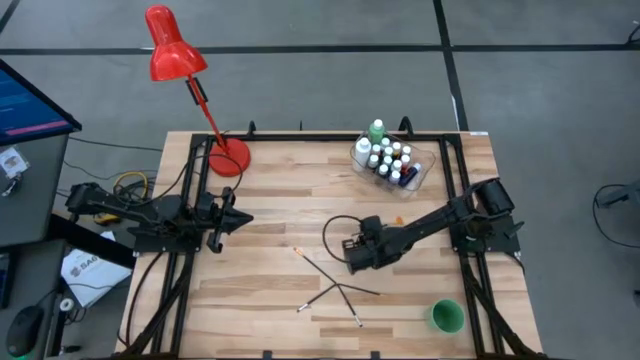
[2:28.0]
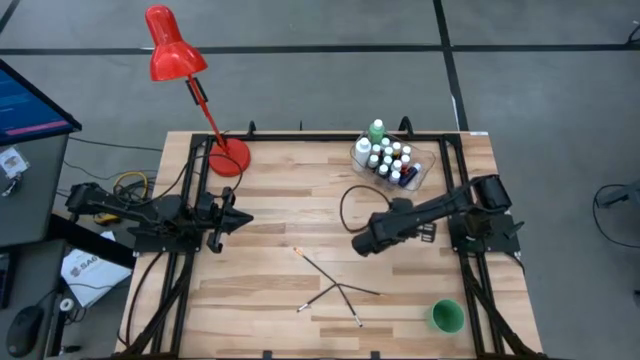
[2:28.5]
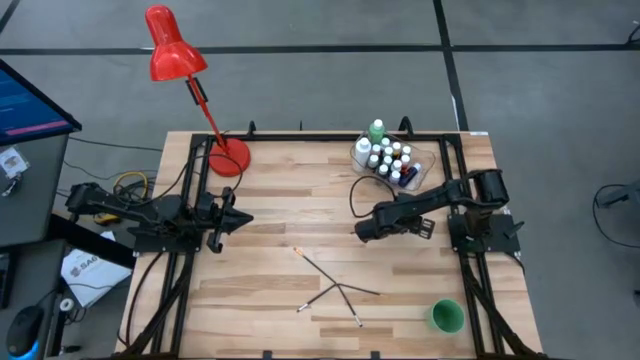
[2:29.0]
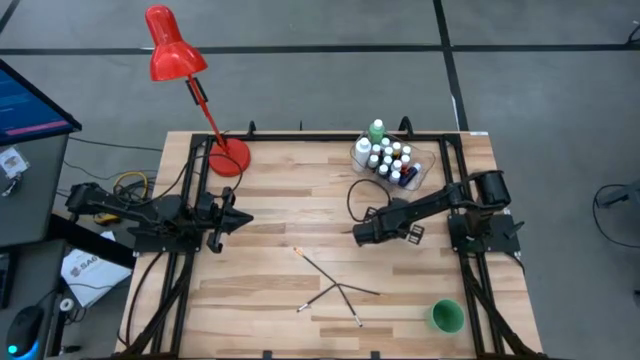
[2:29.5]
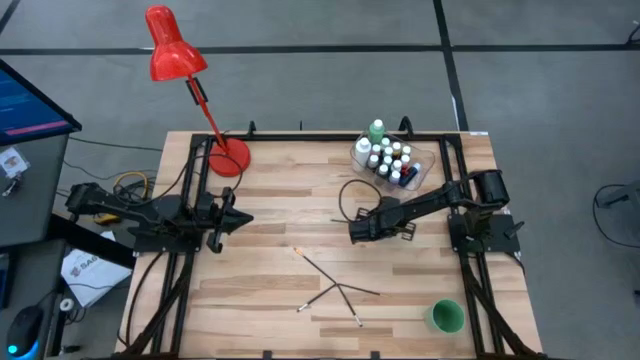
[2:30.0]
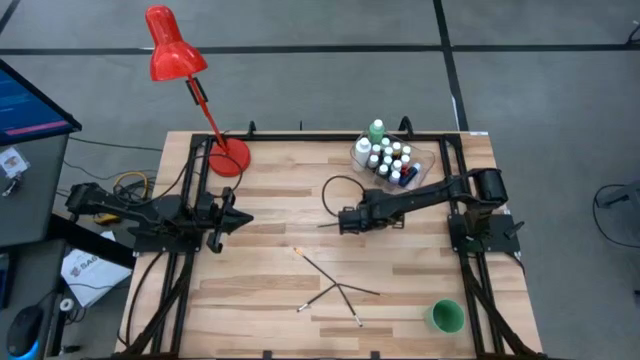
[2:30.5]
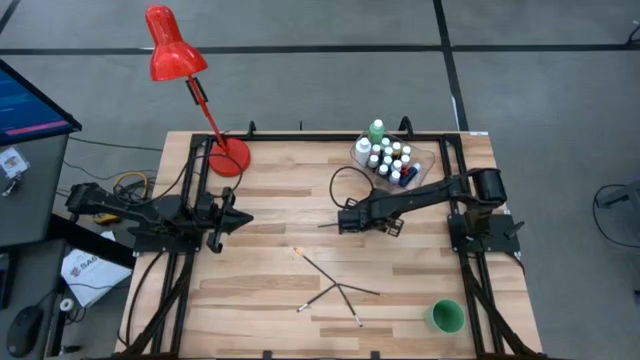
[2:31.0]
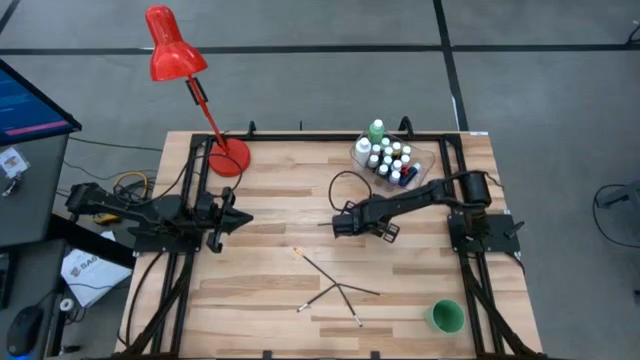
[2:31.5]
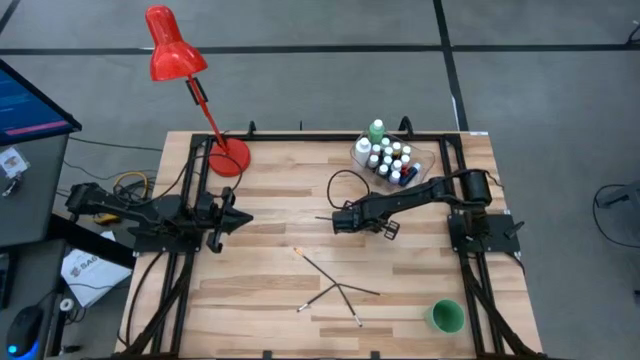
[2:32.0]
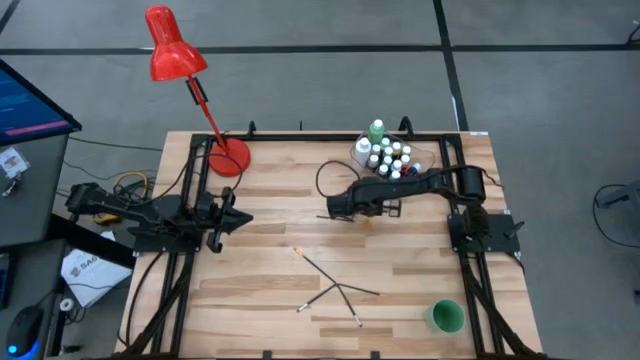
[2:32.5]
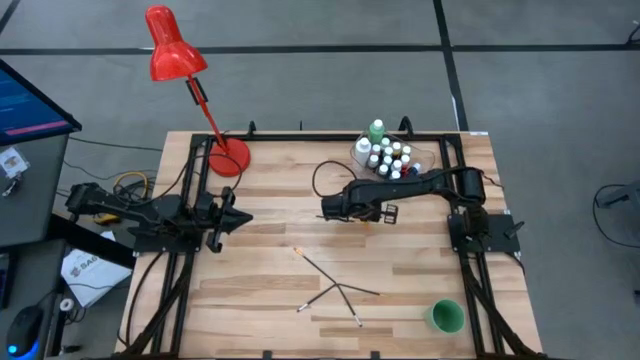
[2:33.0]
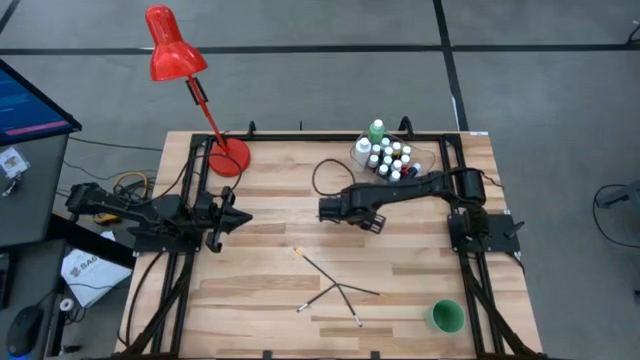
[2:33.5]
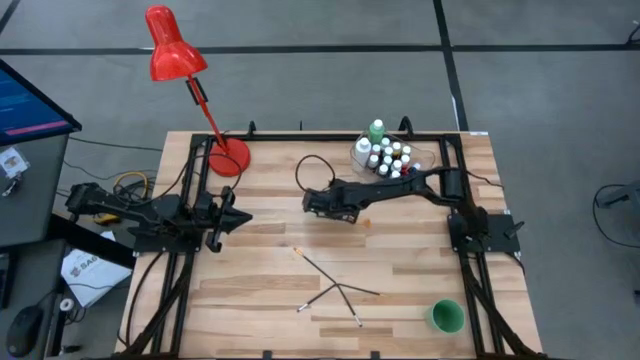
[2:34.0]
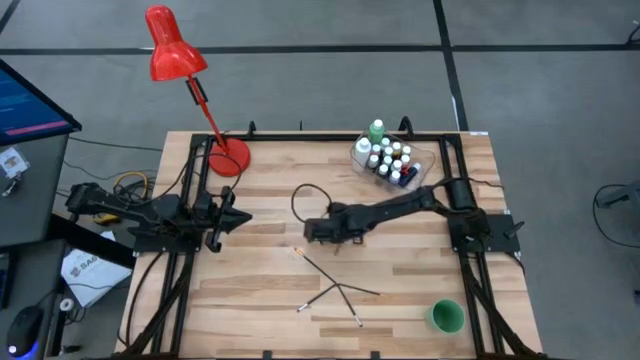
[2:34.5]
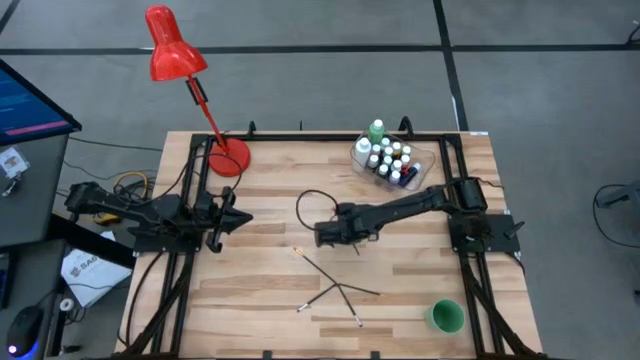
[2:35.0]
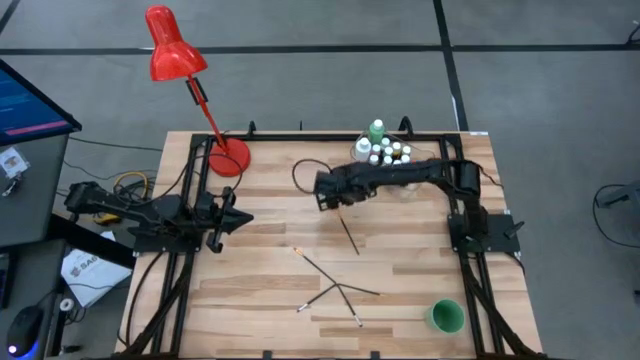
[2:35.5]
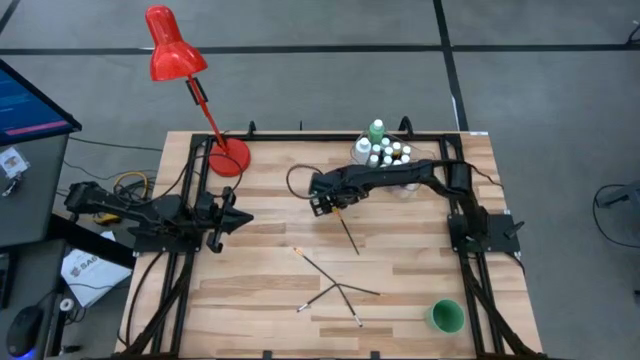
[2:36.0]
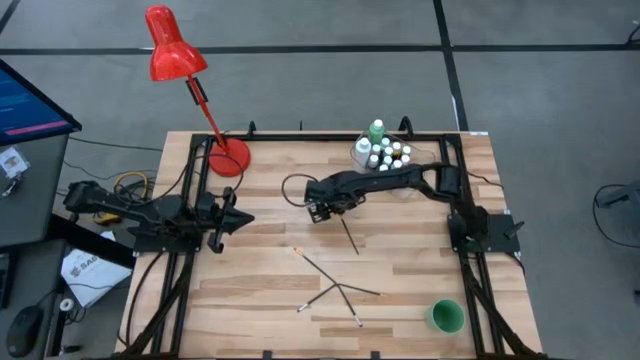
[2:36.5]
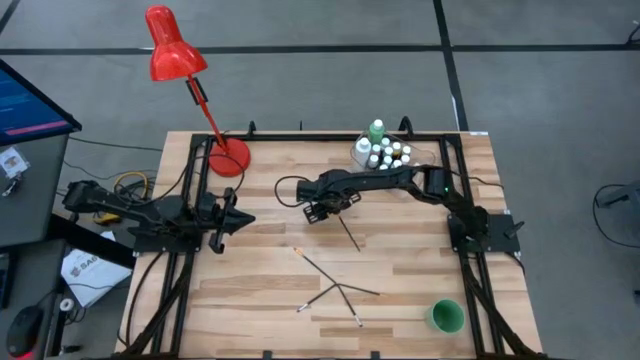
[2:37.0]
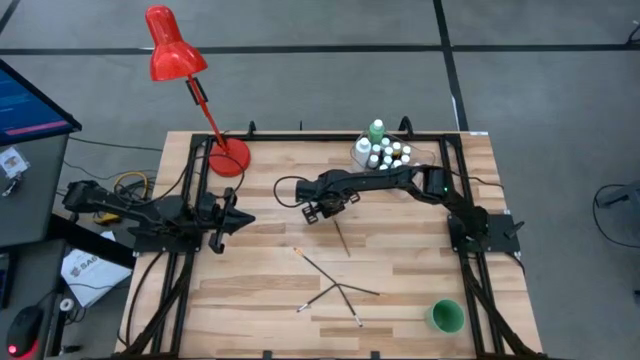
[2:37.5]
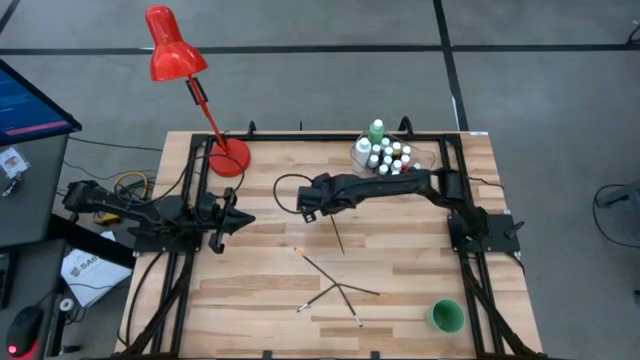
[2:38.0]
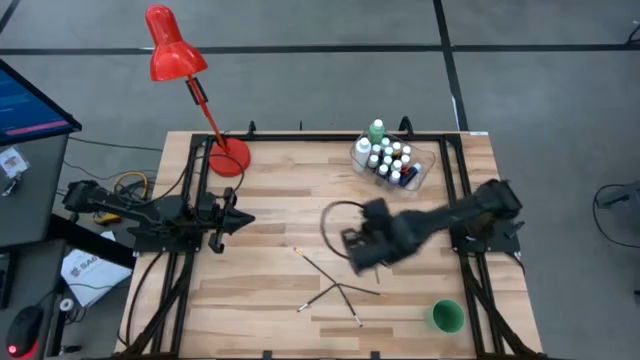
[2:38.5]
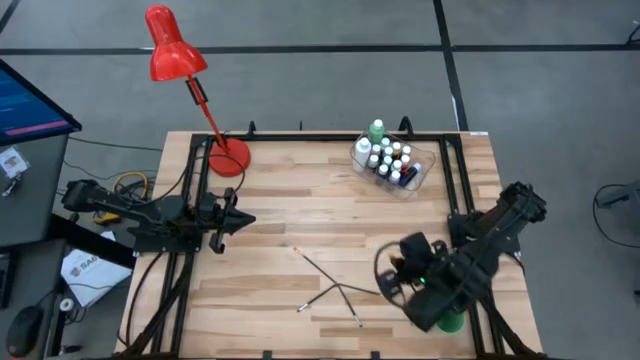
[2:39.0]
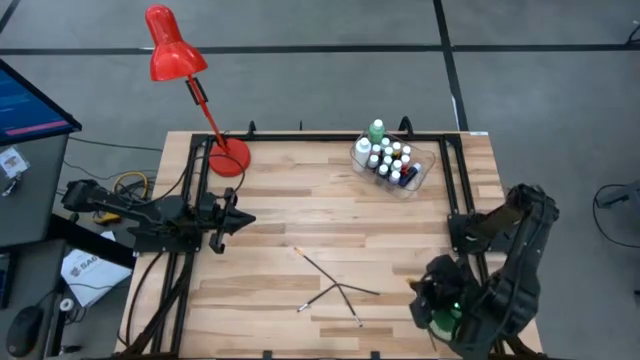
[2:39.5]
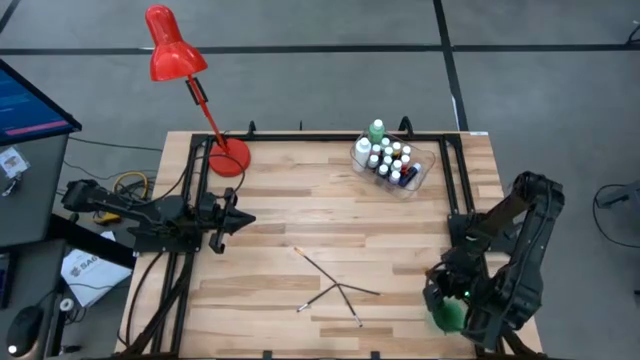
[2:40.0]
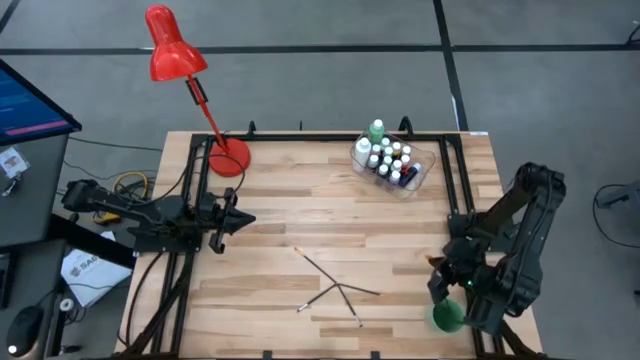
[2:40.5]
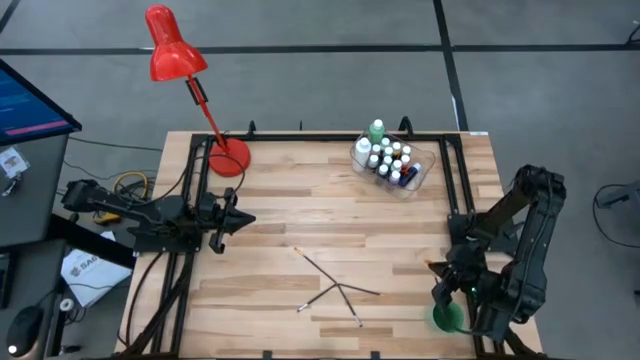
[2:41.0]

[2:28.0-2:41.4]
Task: Pick & Place Paint Supplies
Put the yellow paint brush into the green cup

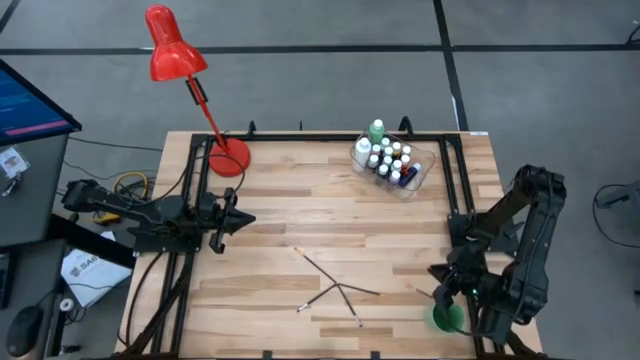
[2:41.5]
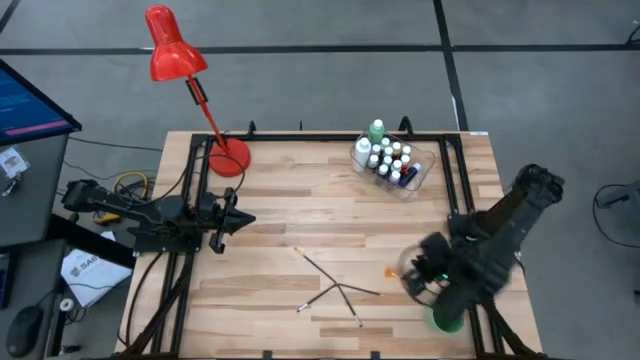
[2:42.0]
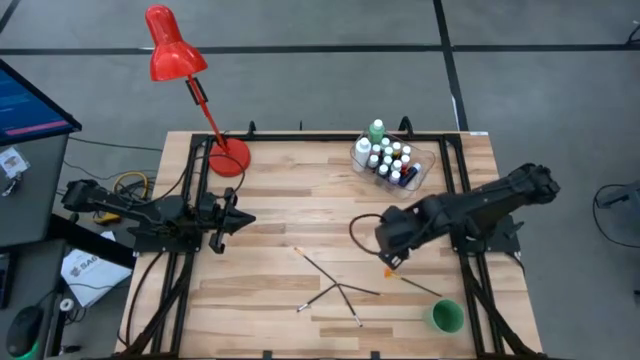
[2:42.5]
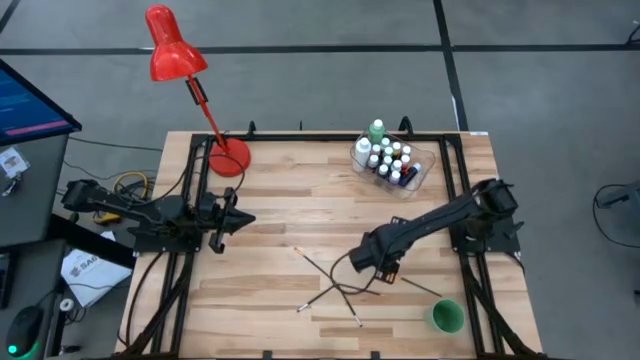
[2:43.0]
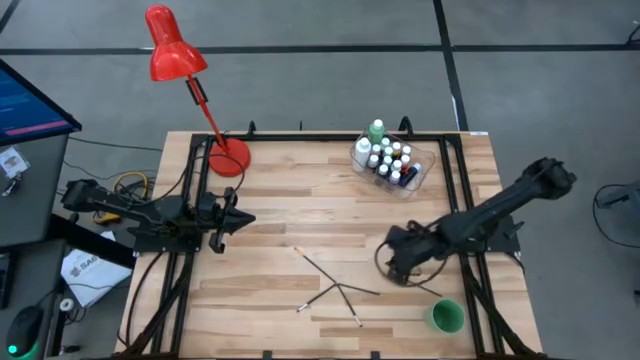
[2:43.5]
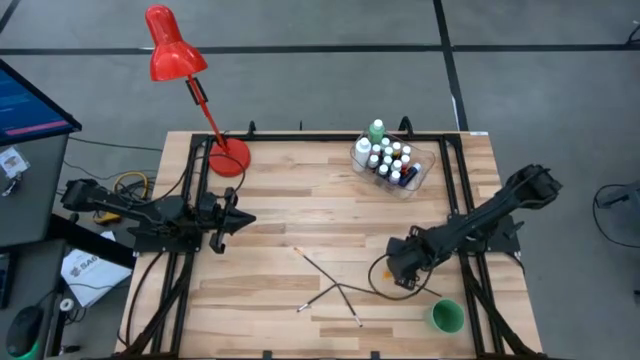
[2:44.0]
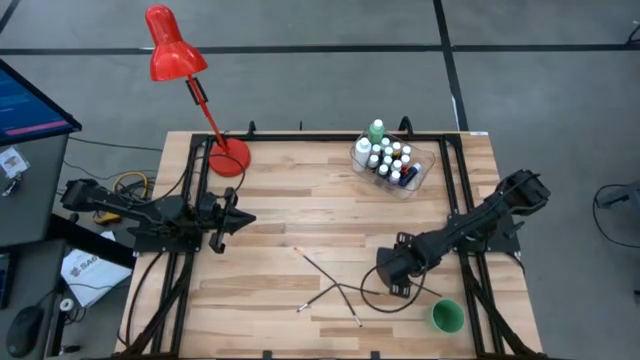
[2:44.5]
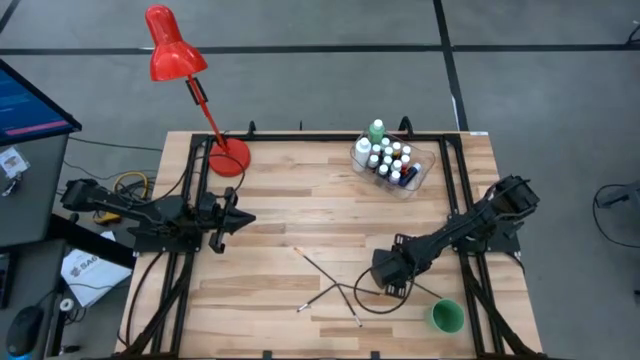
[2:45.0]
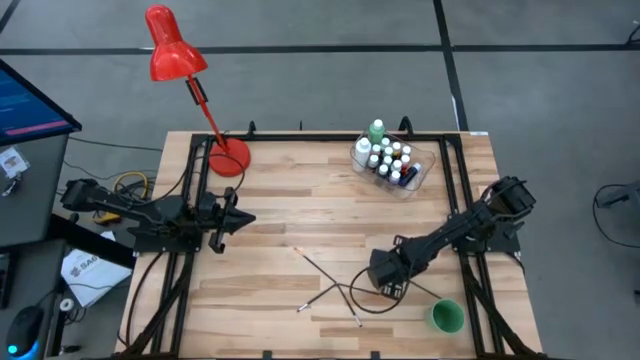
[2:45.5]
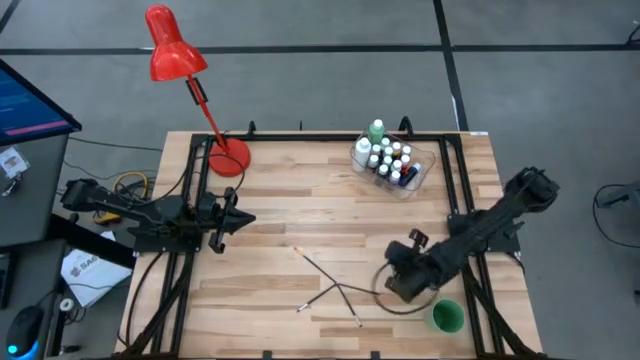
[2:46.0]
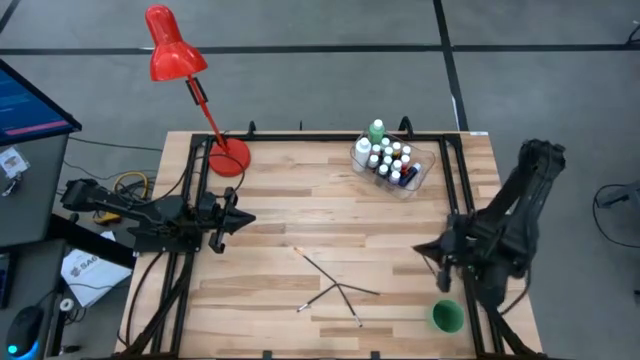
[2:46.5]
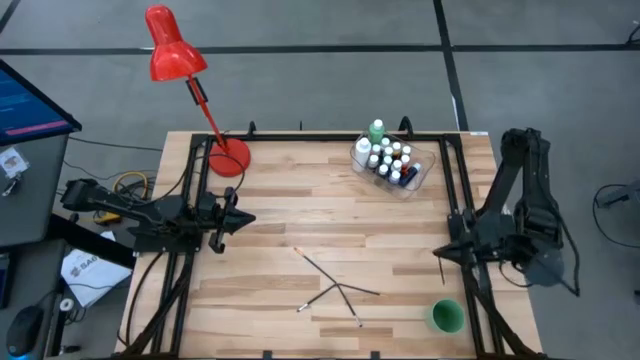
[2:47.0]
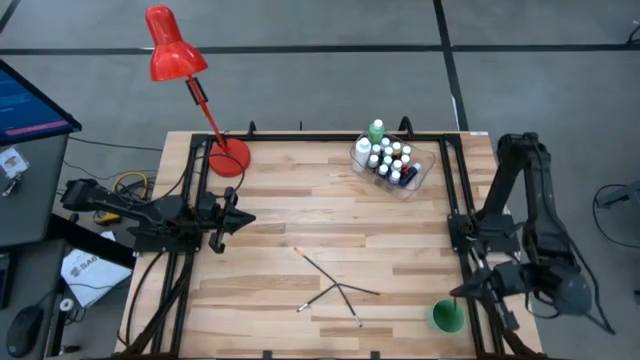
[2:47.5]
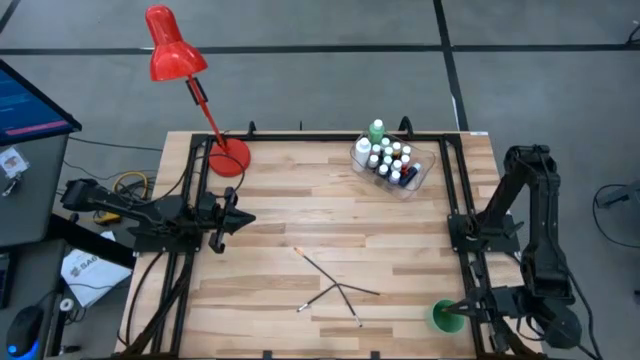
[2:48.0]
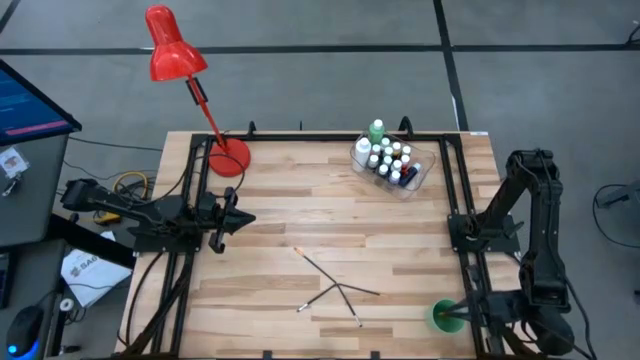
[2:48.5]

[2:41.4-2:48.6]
Put the yellow paint brush into the green cup

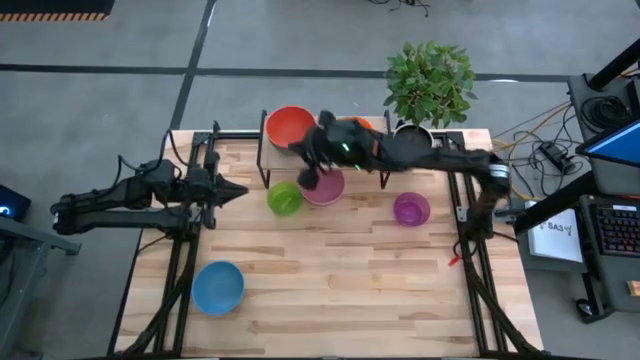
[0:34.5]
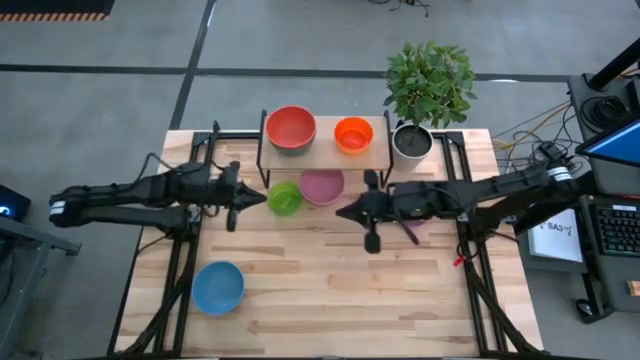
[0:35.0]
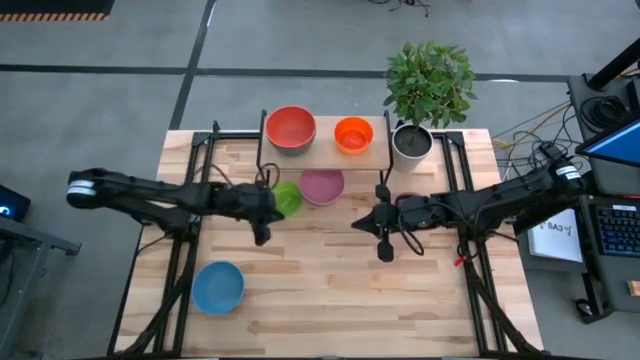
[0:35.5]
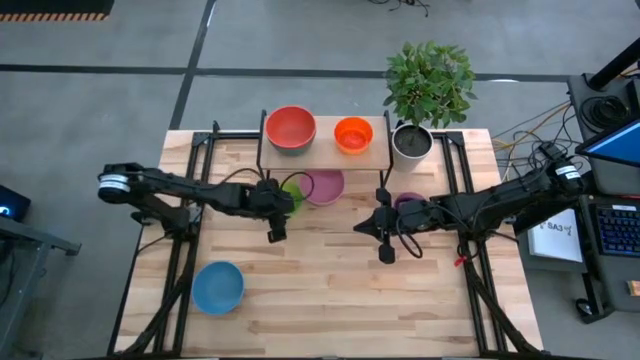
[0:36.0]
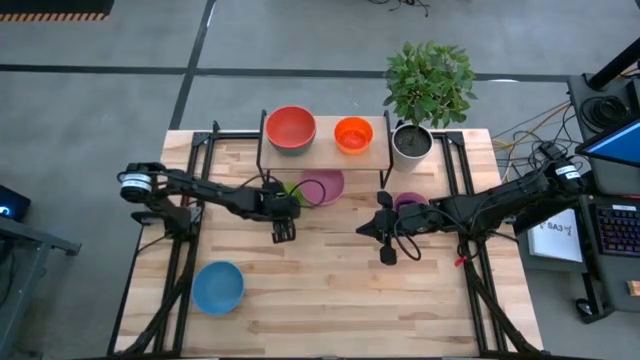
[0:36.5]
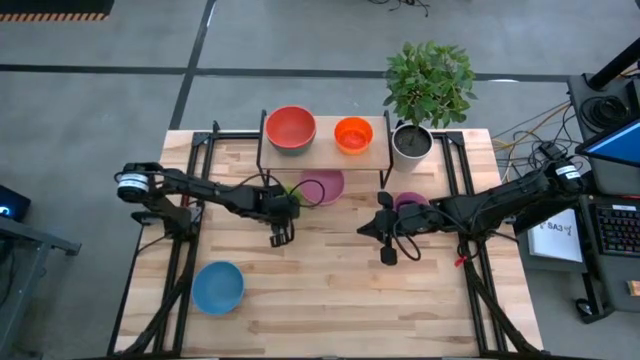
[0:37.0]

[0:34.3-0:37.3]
Task: Place and stack bowls onto a shelf
Stack the green bowl on the orange bowl on the shelf
